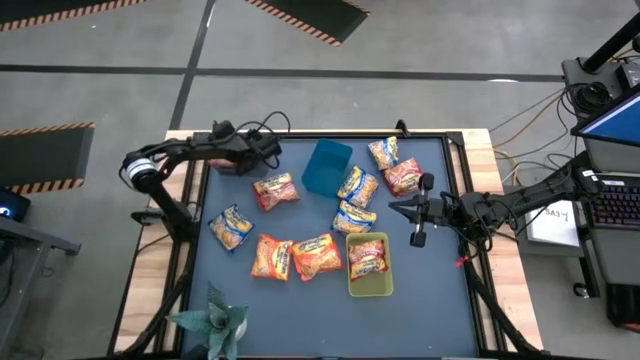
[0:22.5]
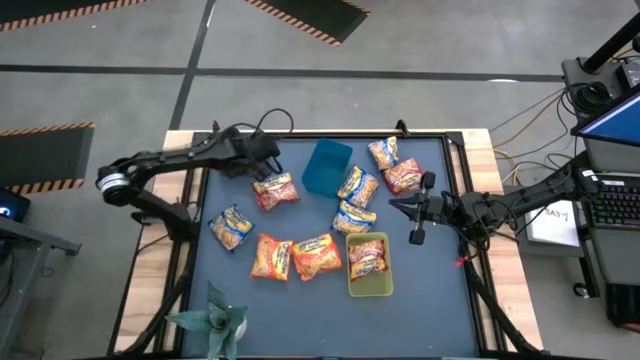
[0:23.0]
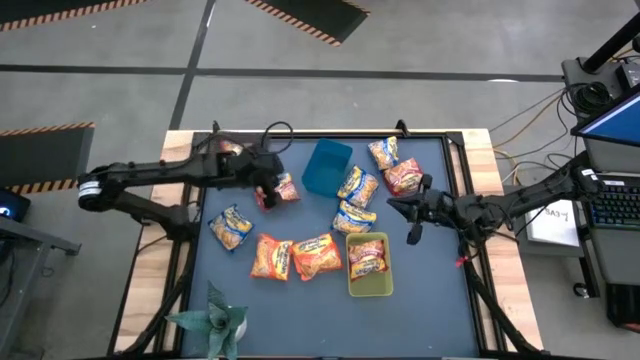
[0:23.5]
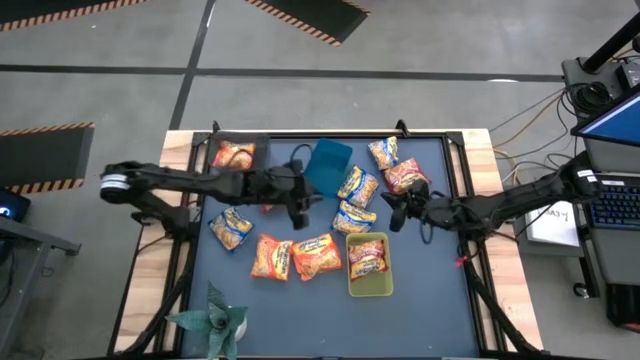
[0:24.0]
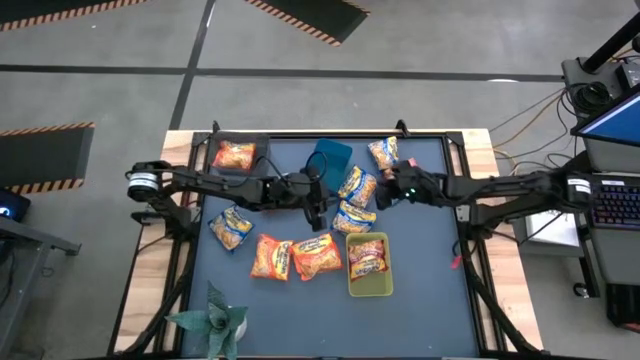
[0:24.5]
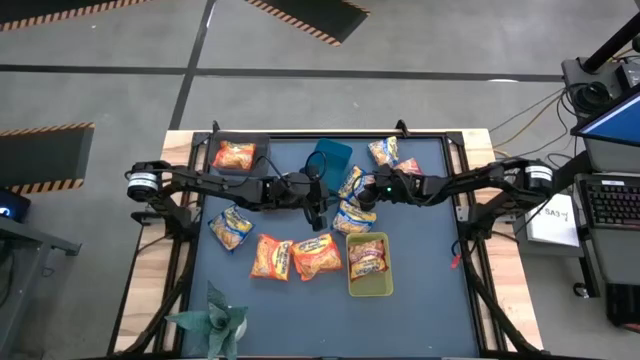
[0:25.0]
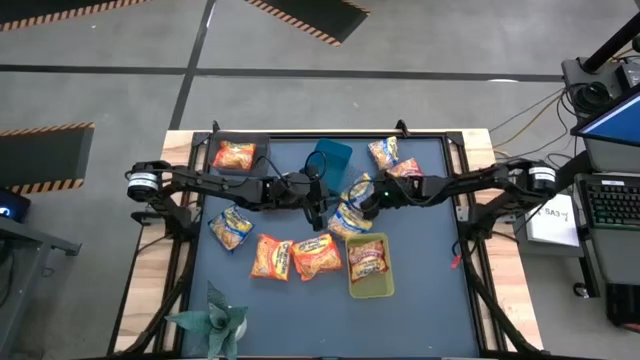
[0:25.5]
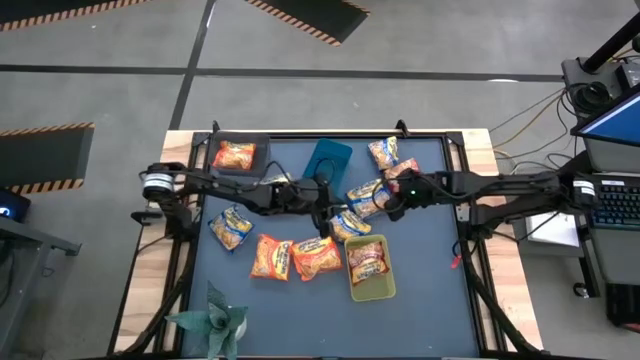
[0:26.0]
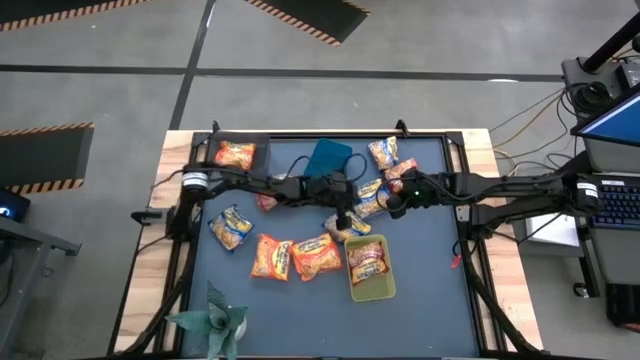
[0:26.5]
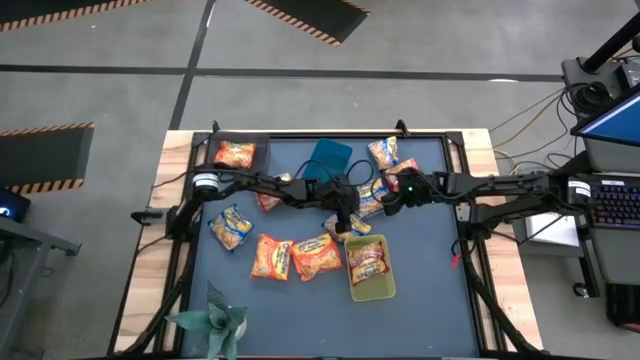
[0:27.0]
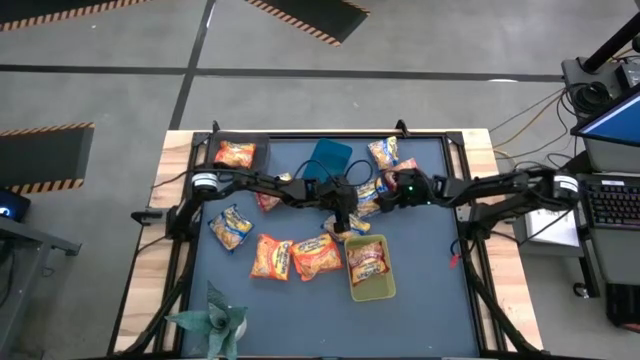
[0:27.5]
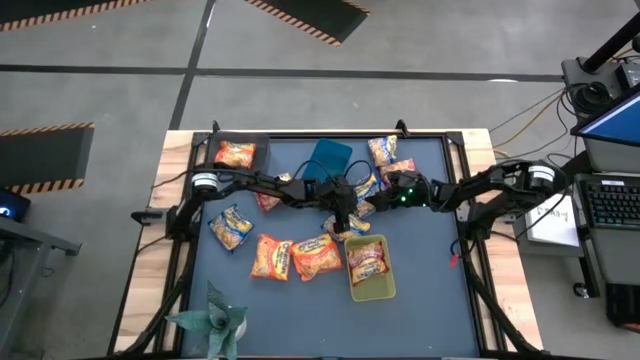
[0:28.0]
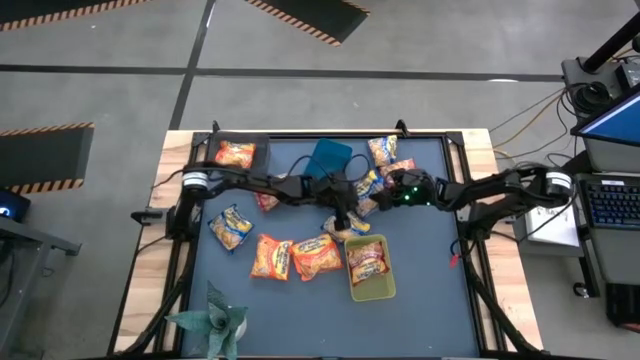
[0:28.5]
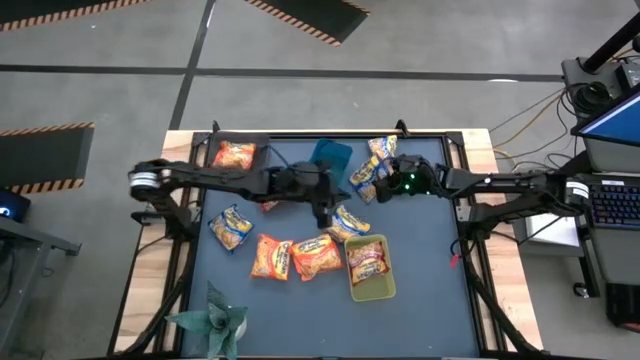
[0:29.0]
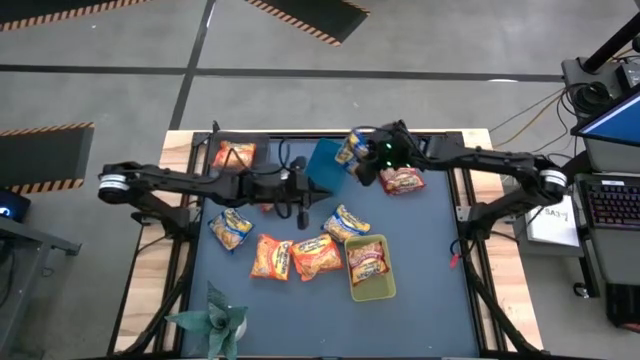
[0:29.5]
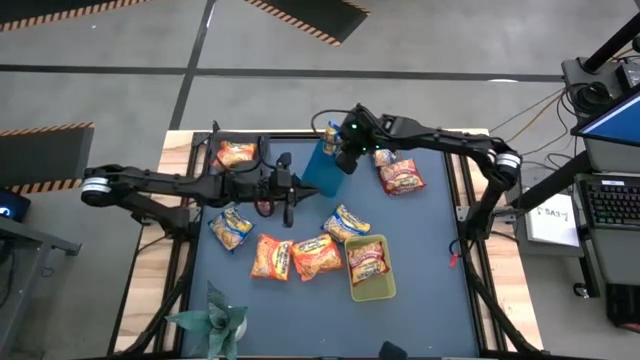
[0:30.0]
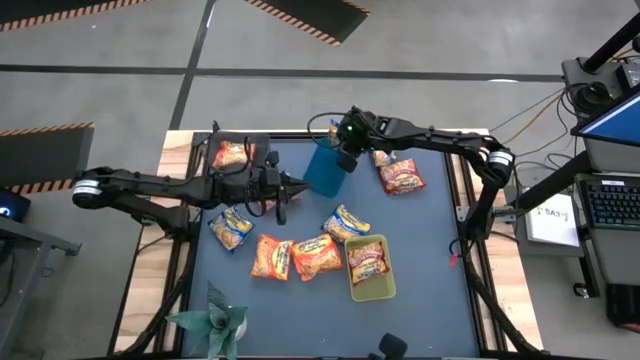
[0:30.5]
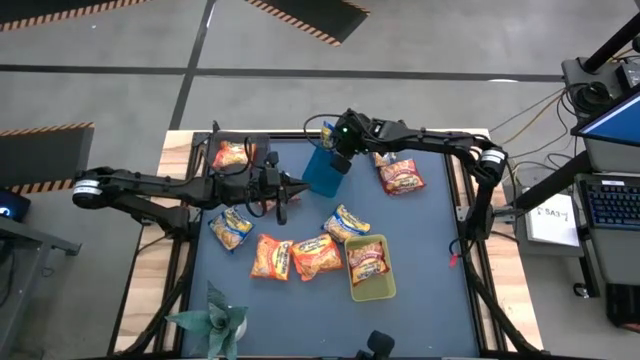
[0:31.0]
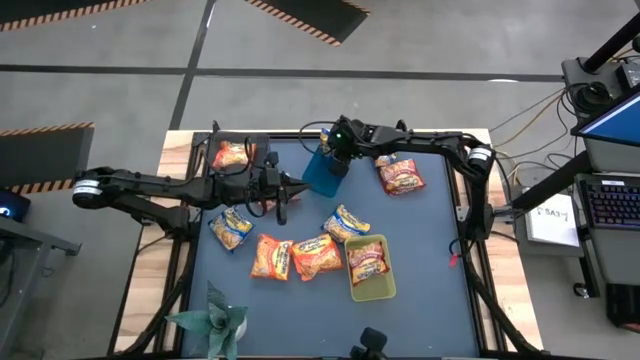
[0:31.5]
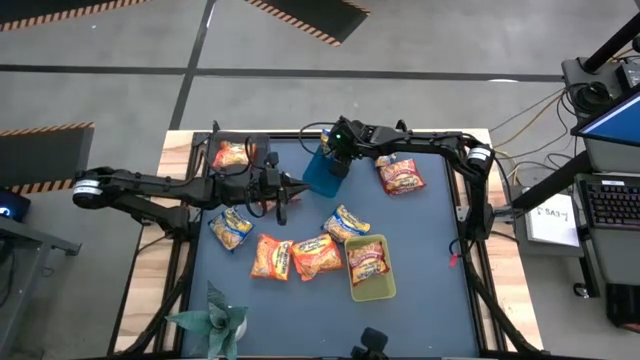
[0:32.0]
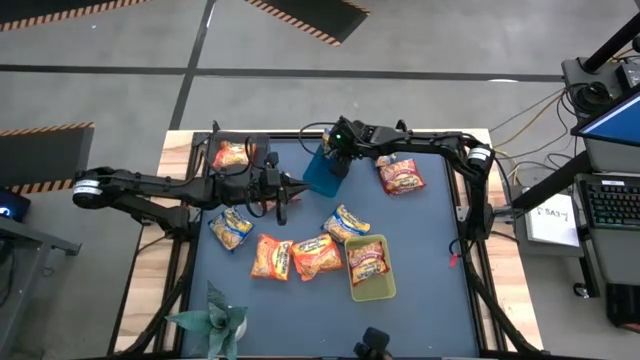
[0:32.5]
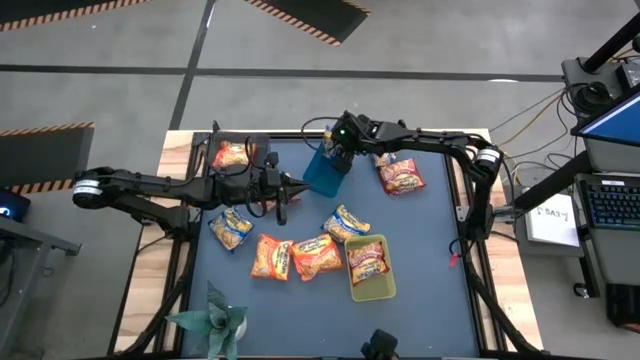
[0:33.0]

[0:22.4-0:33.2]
Task: Sort Maruchan noodles
Put the blue noodle pack into the blue bin

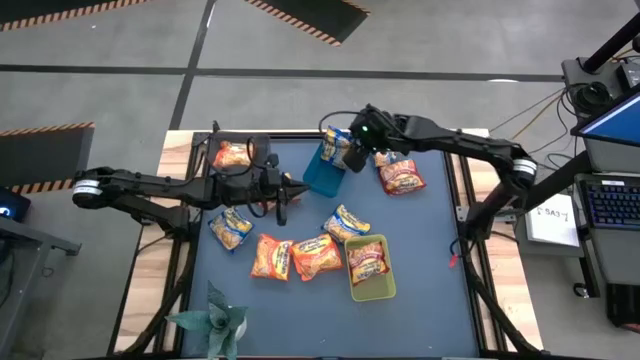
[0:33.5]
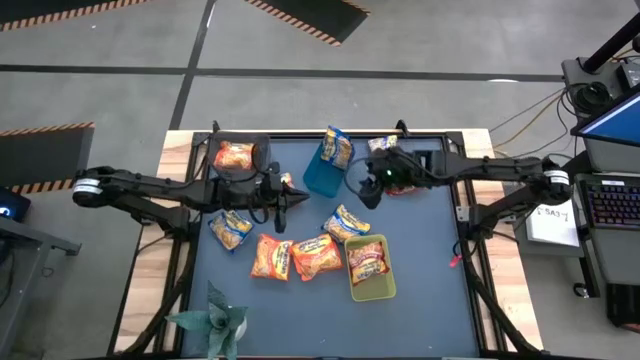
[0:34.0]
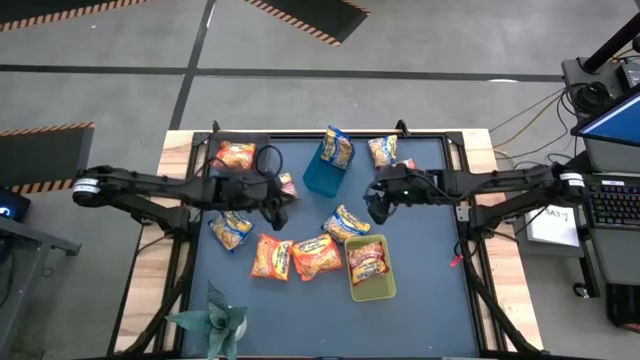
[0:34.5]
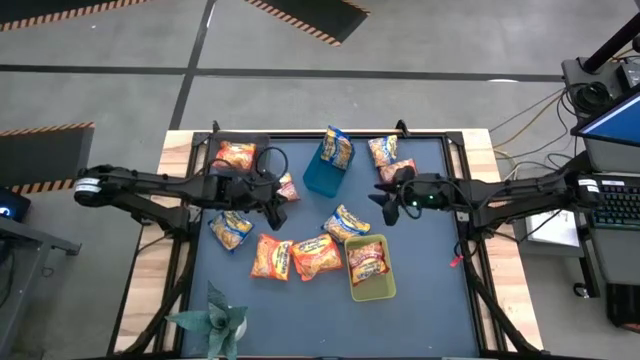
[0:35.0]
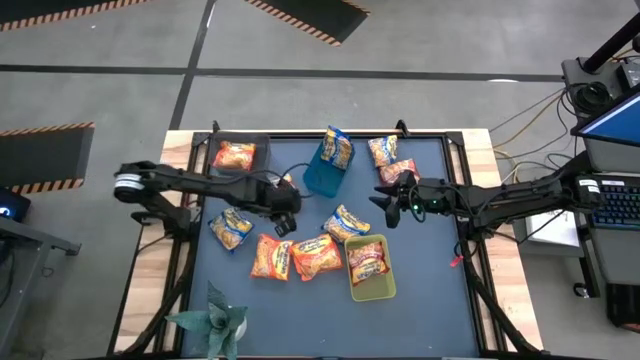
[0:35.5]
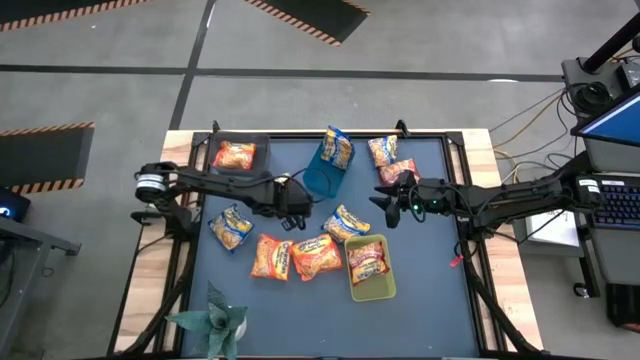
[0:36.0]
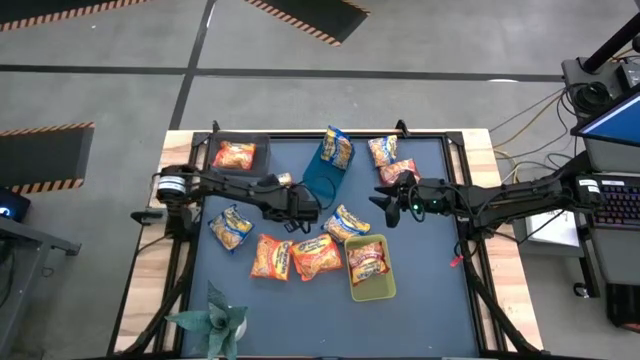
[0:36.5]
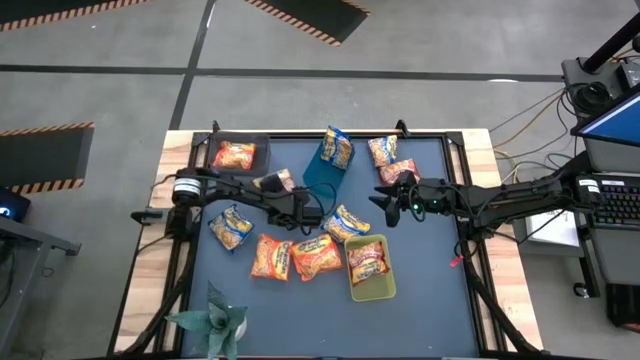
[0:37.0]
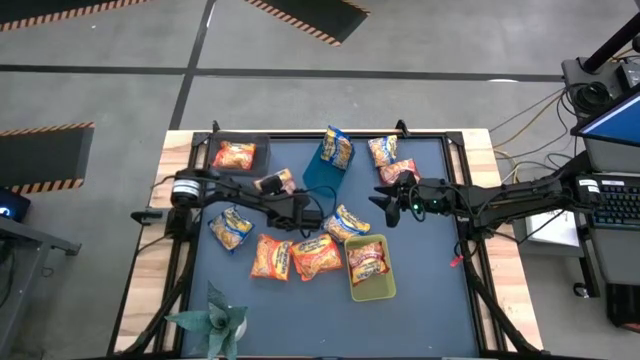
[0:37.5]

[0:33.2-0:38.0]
Put the red noodle pack into the yellow bin

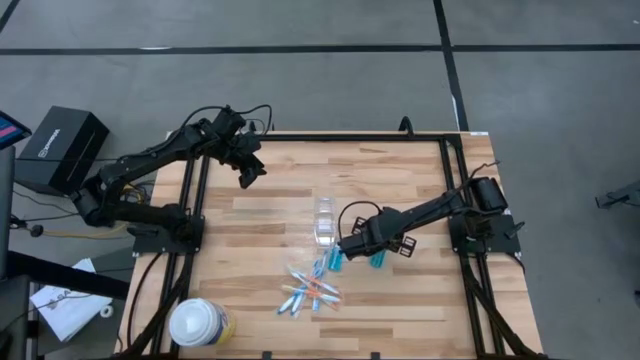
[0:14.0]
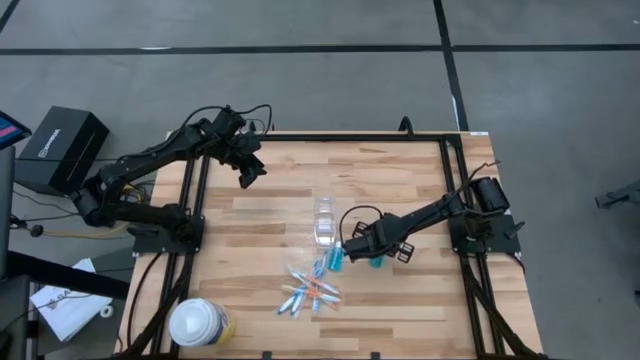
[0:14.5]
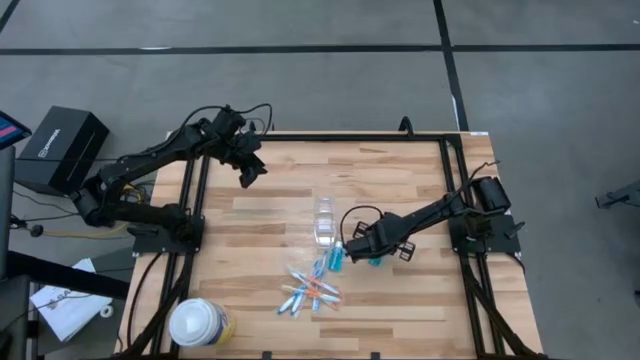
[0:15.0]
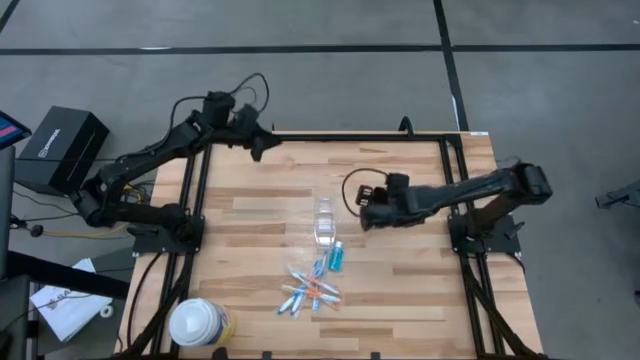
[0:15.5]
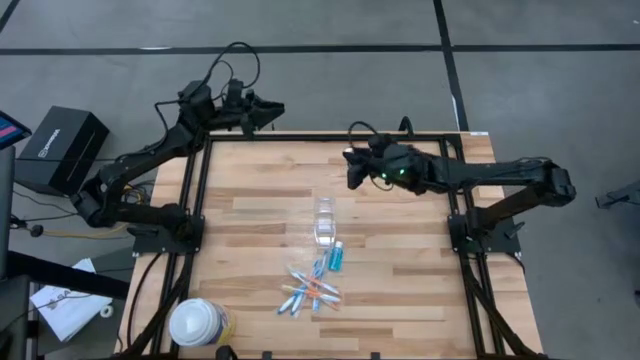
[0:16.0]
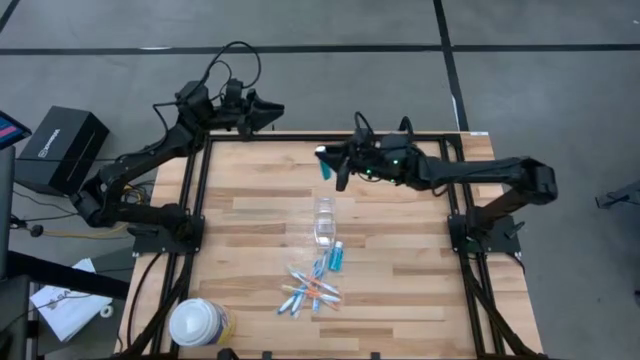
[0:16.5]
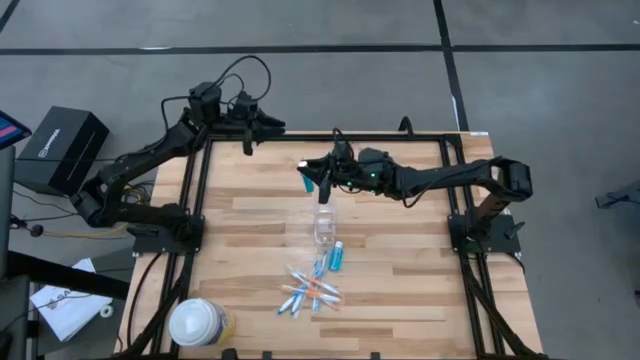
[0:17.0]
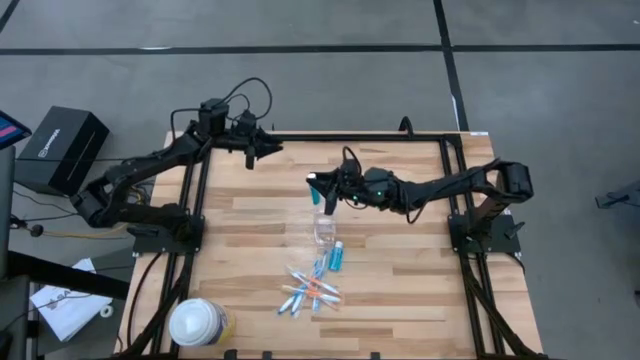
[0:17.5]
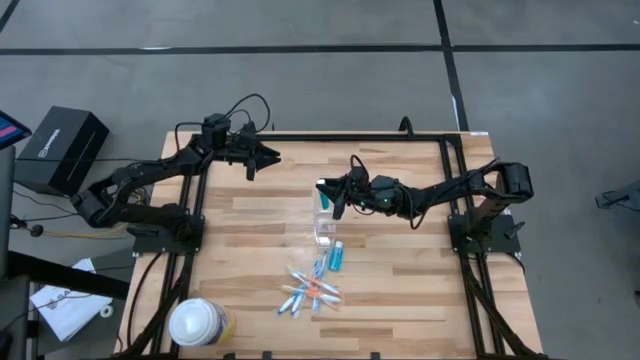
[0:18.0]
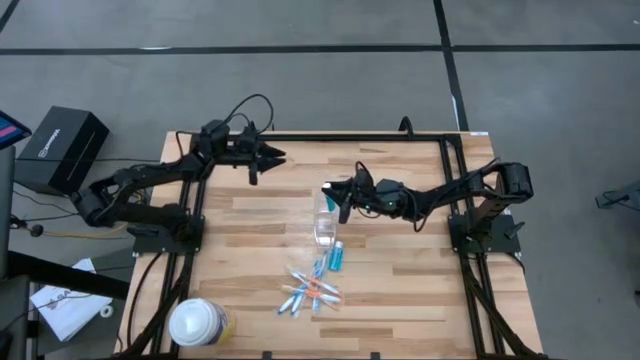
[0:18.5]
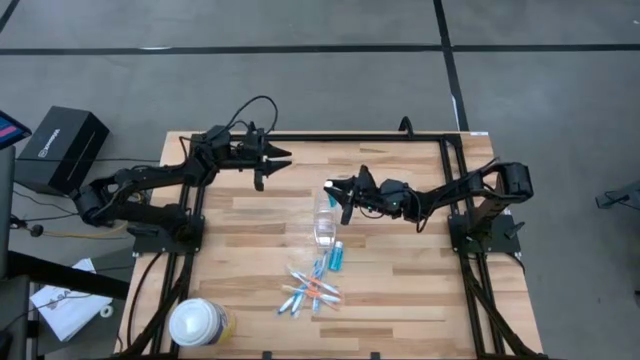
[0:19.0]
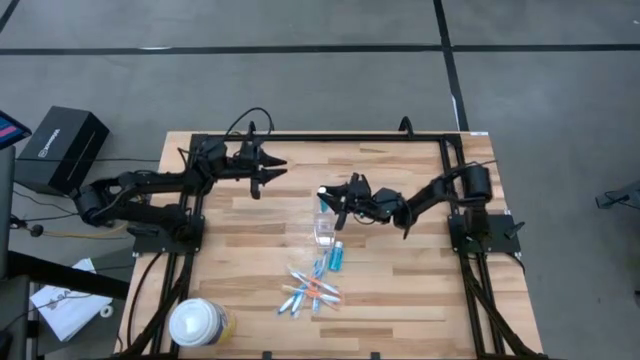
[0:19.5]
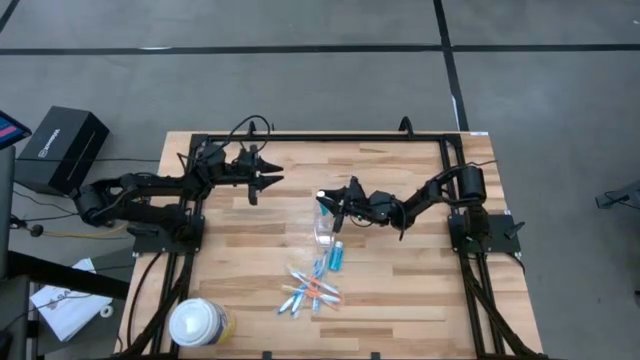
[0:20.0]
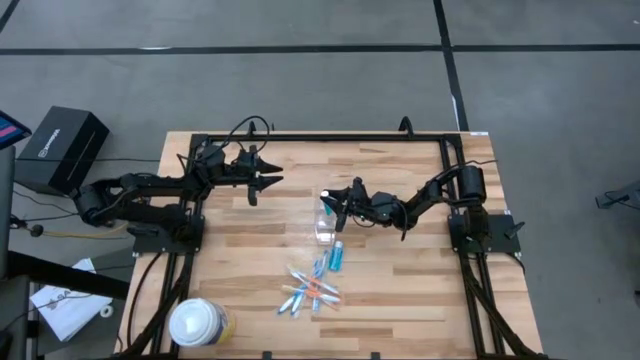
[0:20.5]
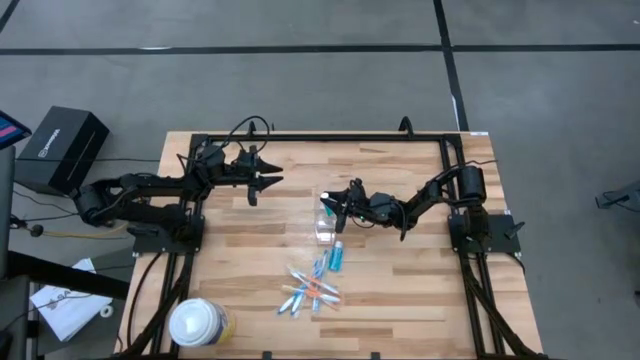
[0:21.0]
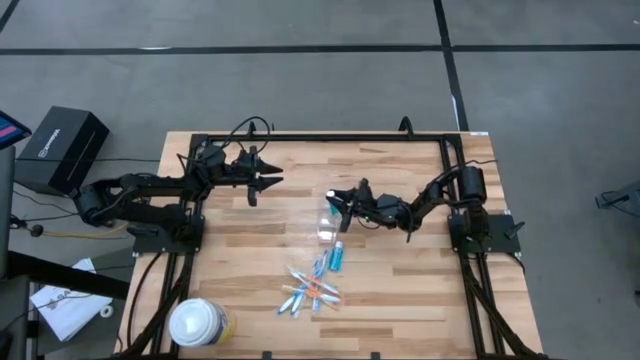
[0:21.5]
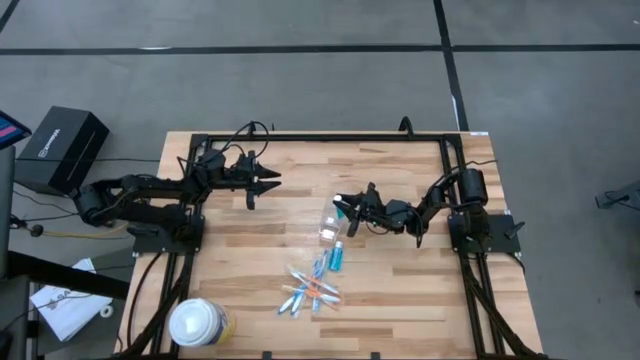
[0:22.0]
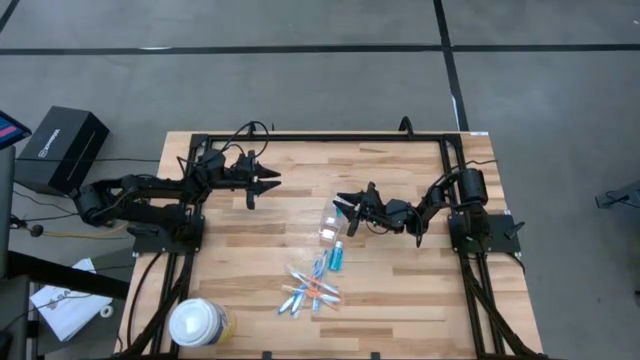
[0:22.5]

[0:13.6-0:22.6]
Task: Pick & Place toothbrushing station
Put the right mouthwash into the middle section of the transparent organizer
